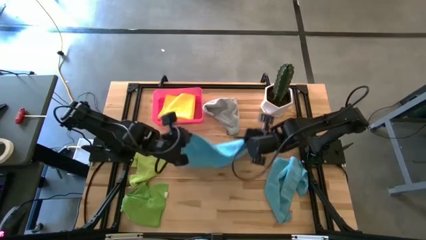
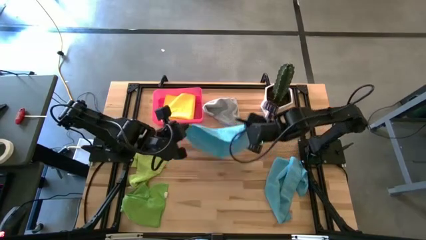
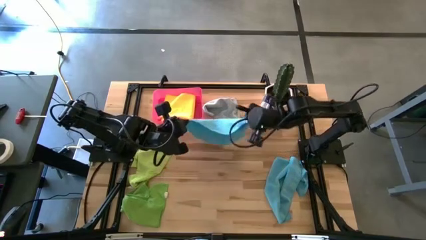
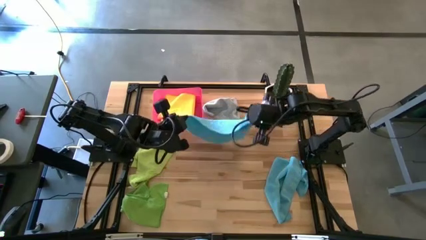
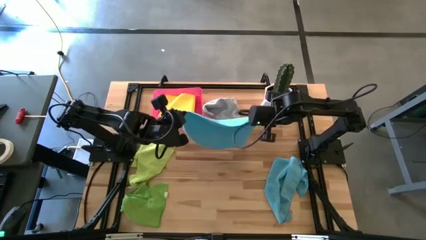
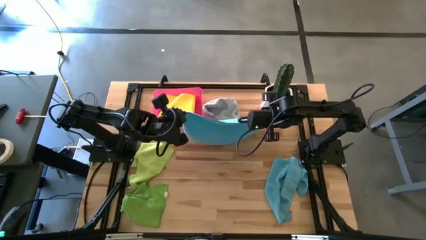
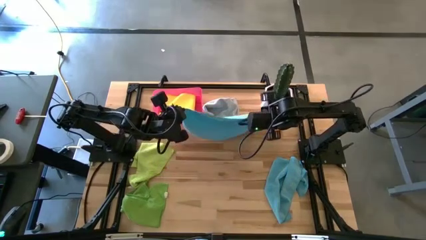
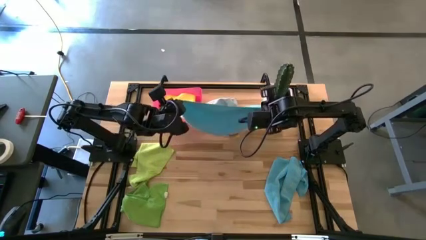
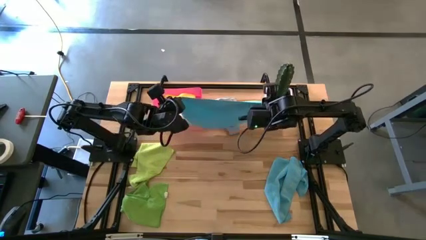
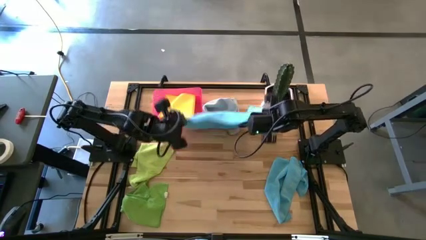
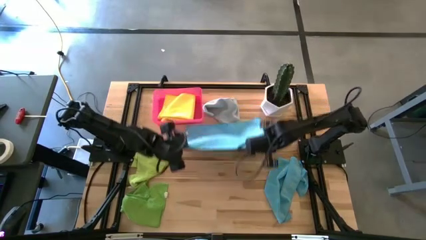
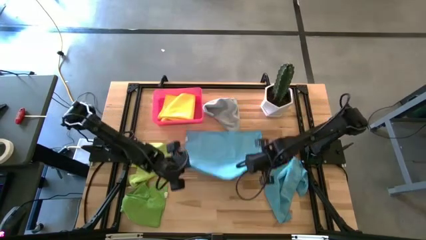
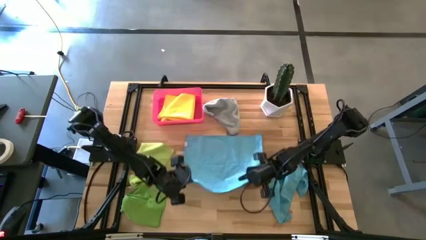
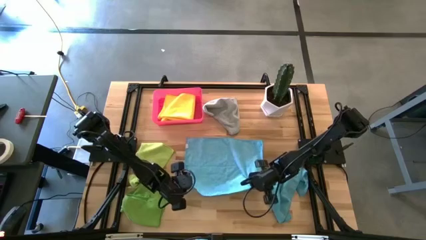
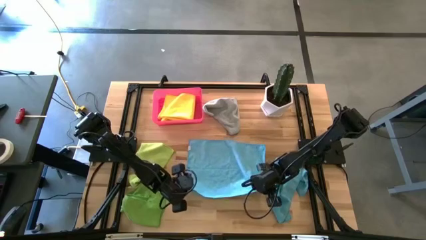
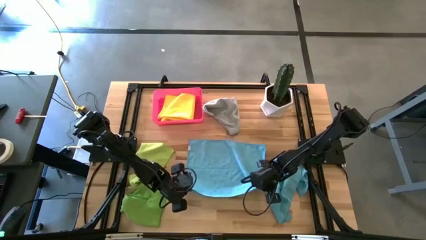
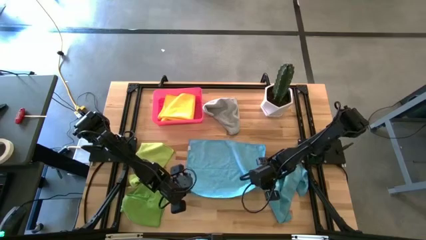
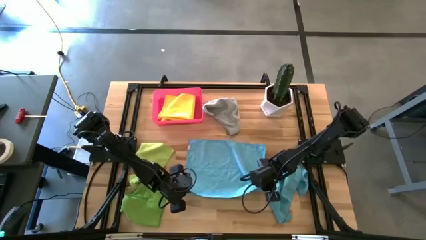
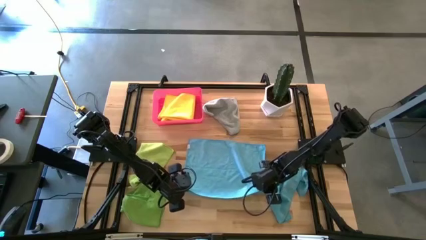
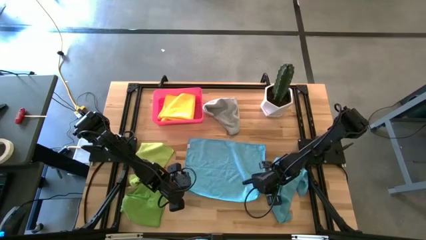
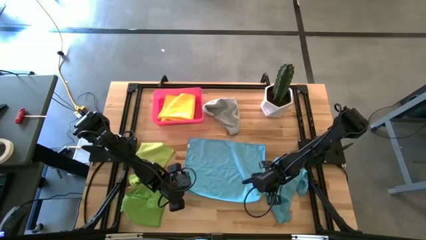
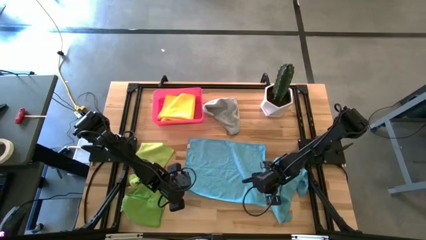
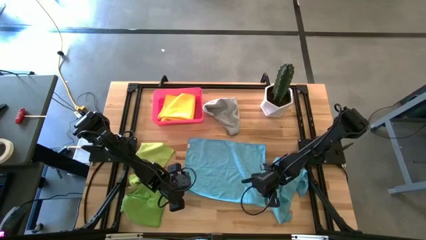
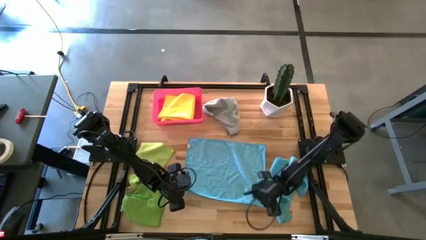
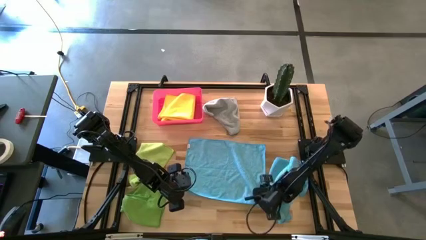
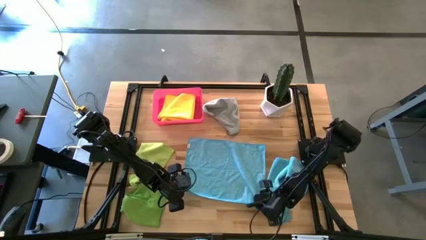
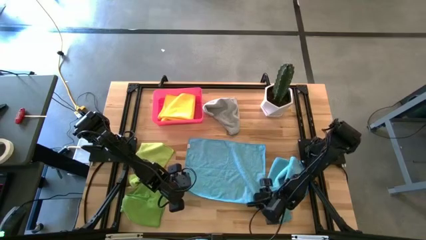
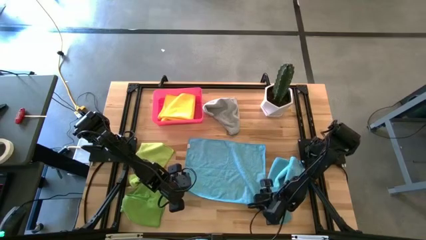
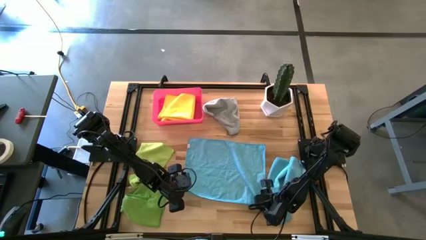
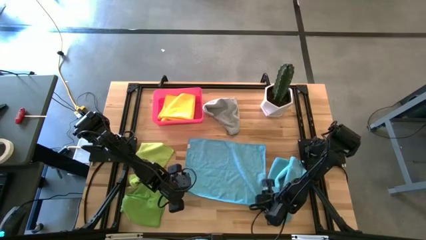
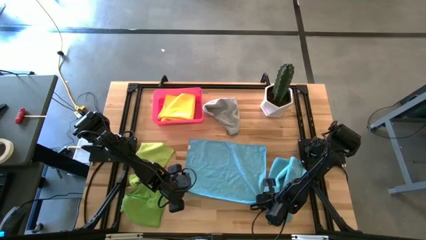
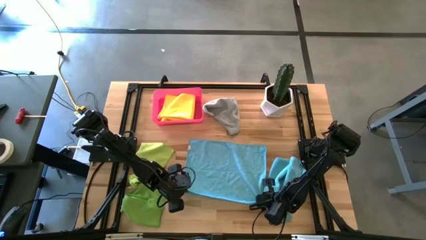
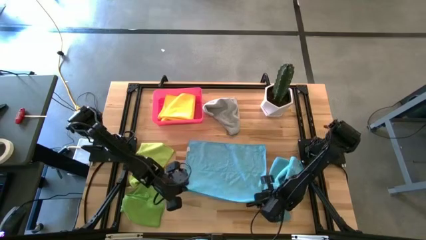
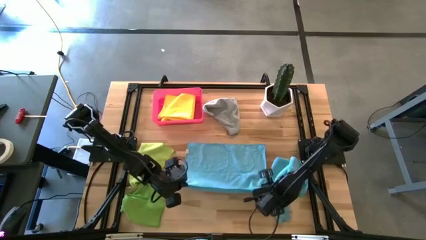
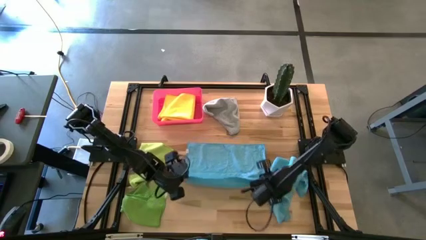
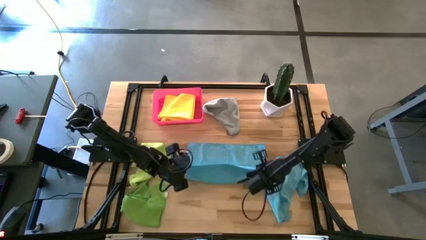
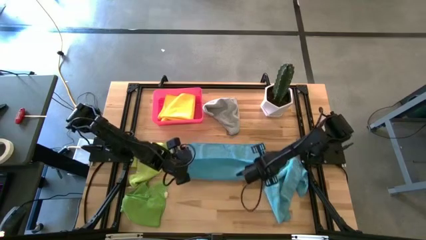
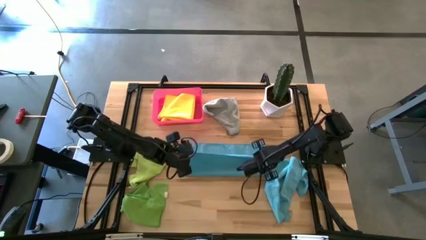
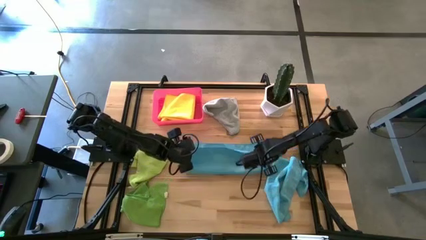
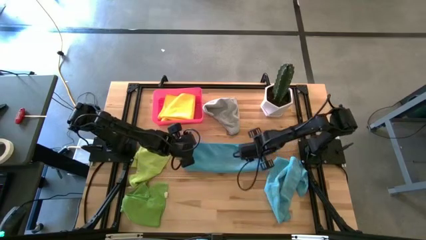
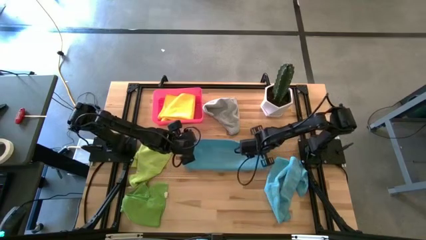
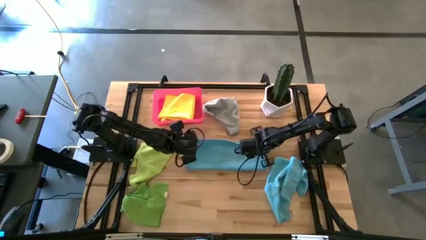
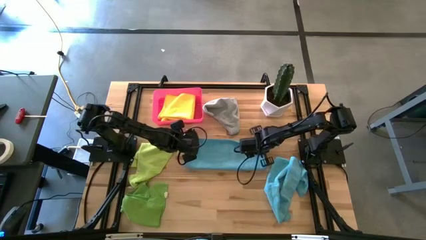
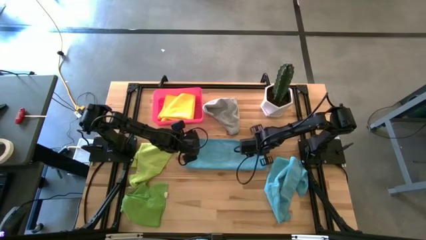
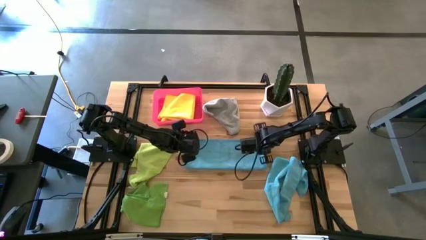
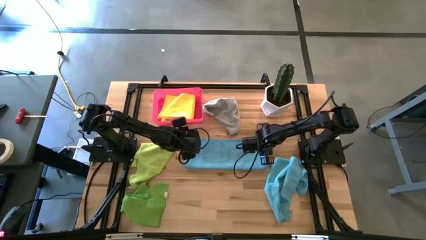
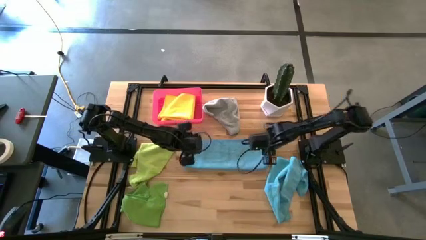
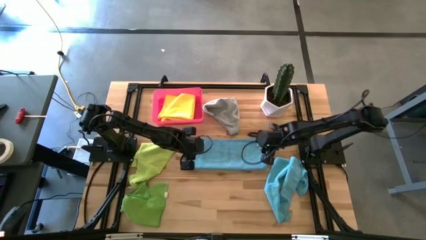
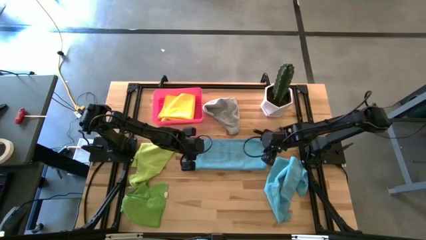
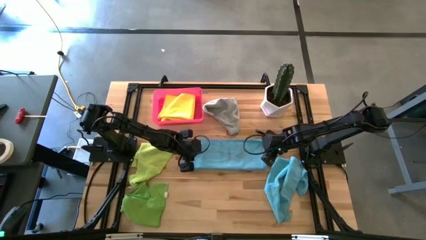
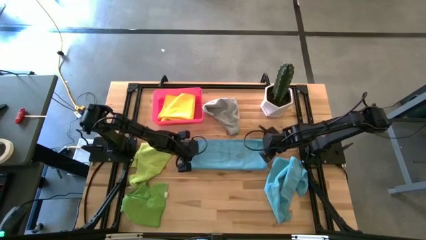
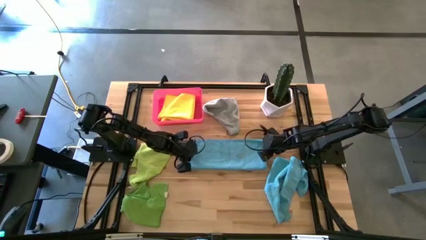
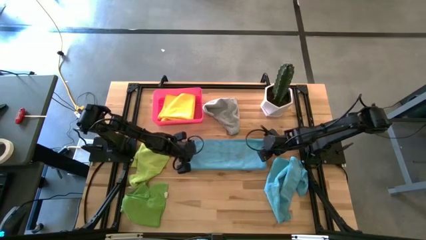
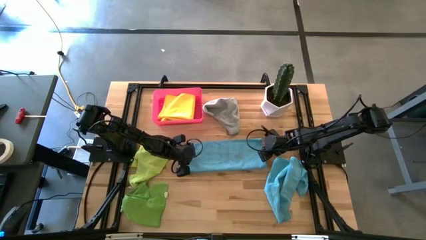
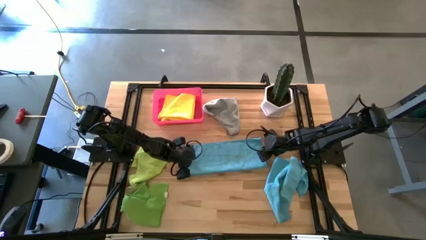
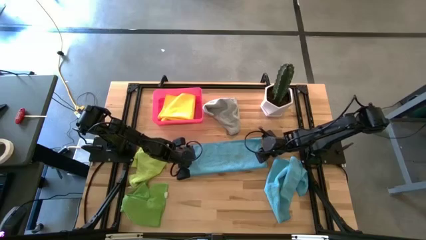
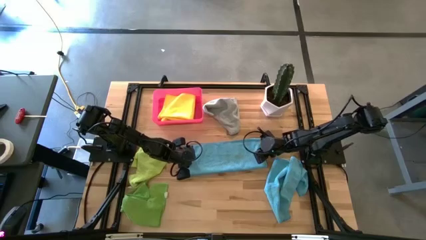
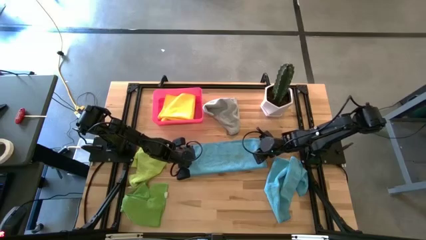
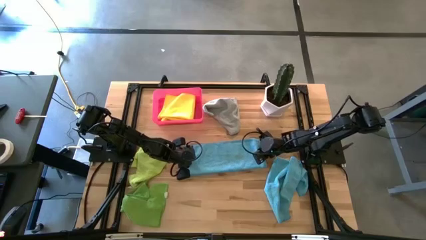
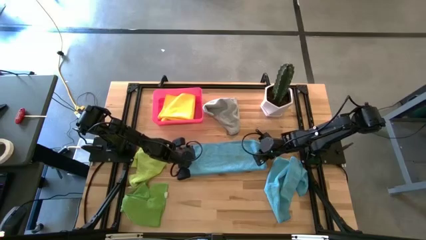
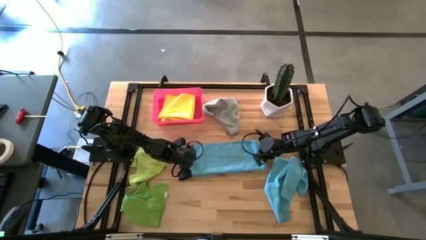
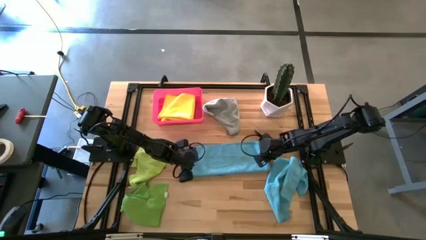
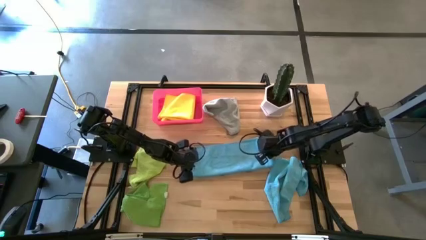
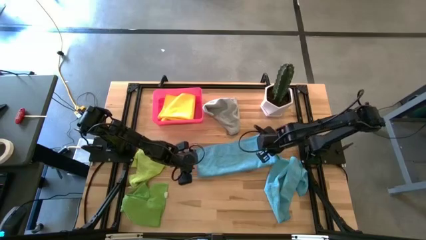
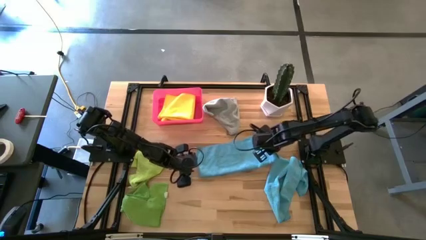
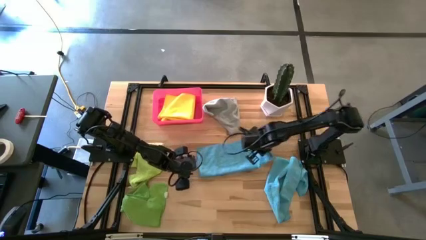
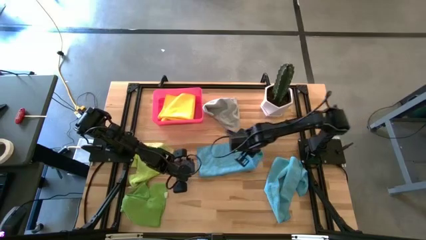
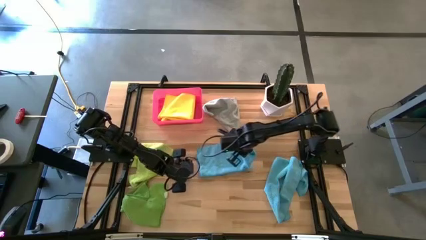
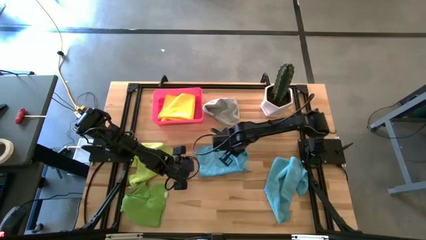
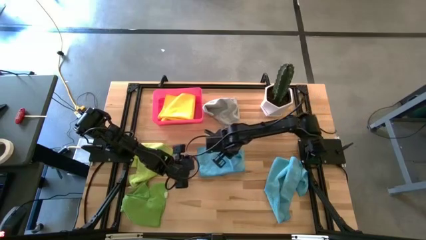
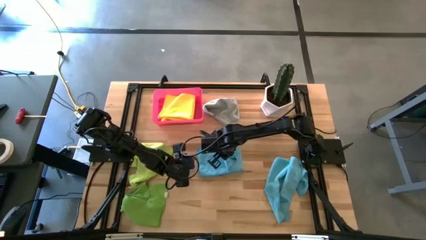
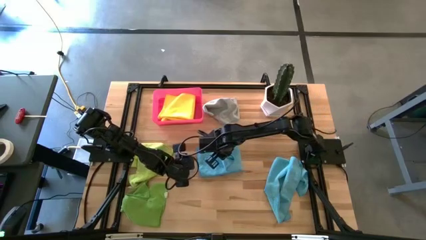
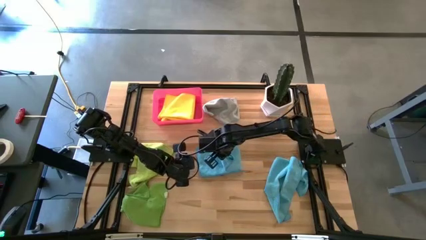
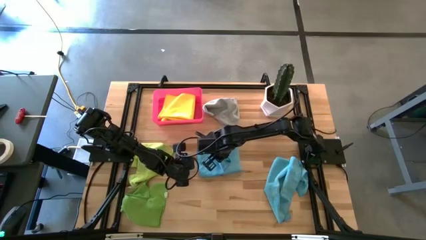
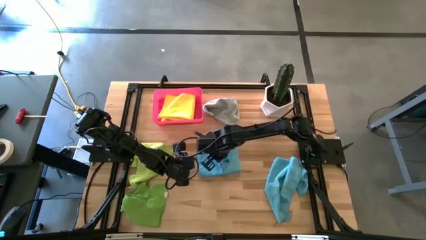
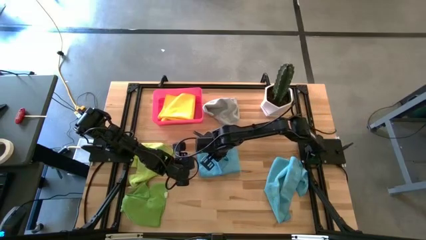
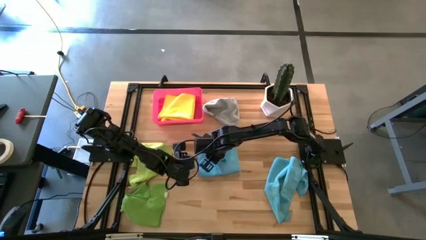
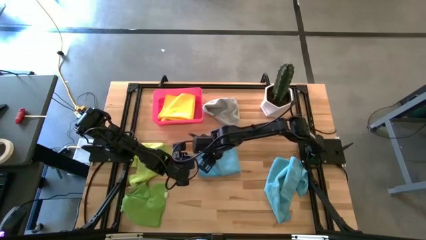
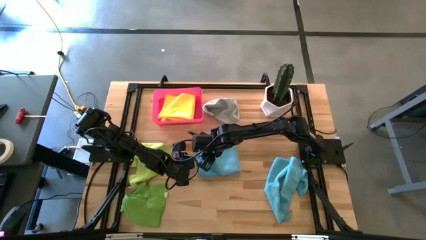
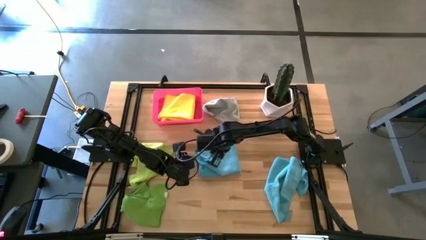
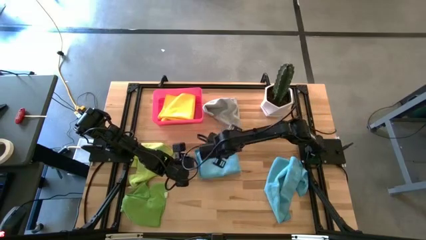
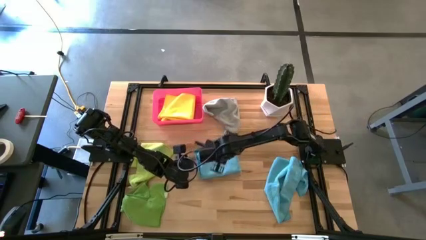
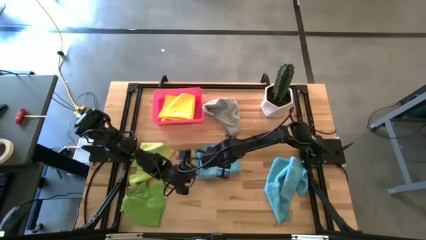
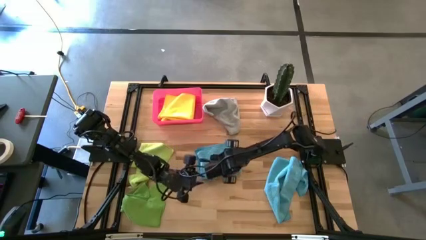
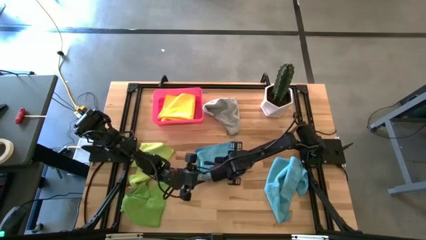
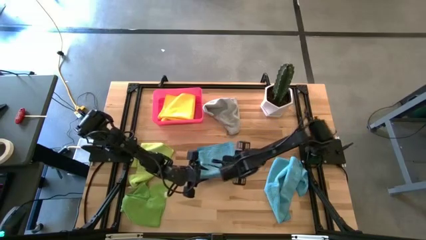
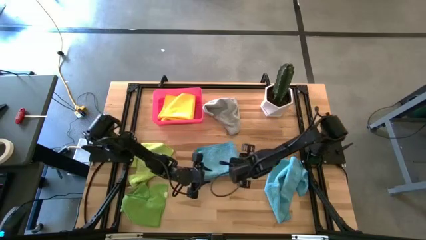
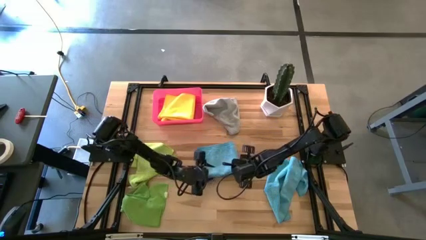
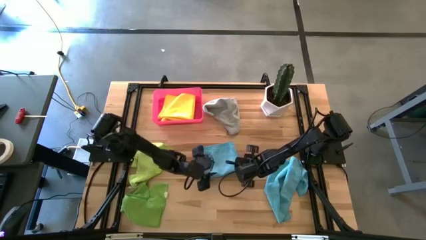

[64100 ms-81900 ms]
Task: Fold microfiber towels
Fold the top blue towel on the table
